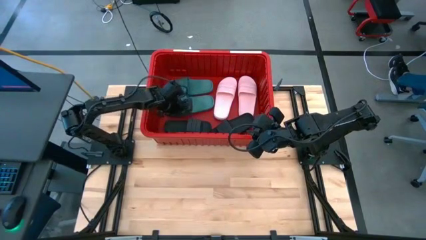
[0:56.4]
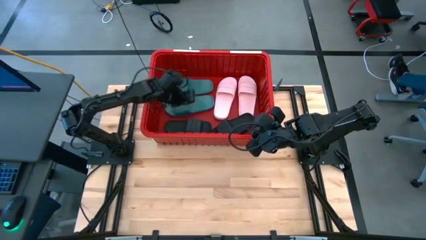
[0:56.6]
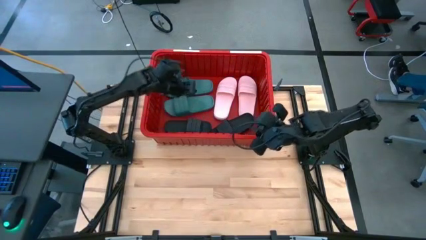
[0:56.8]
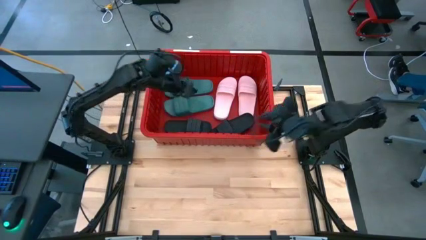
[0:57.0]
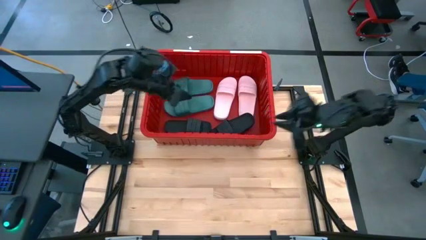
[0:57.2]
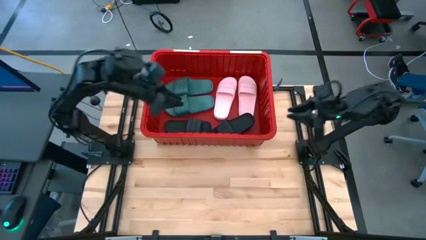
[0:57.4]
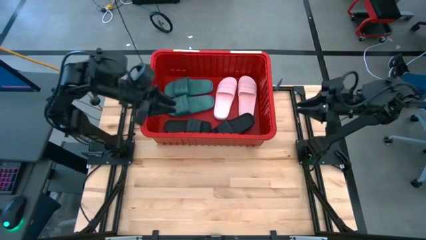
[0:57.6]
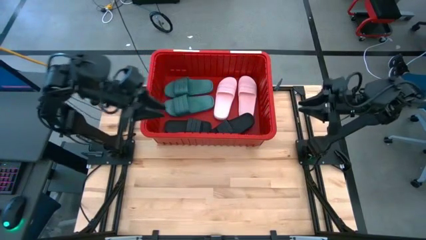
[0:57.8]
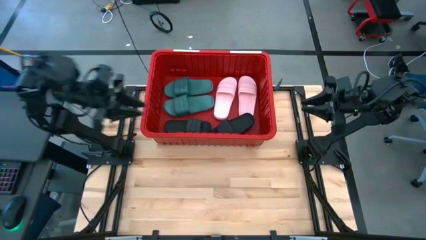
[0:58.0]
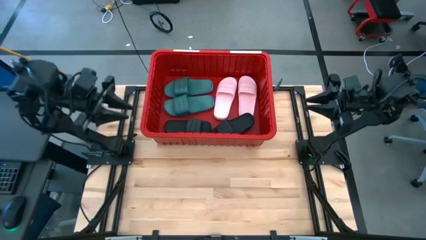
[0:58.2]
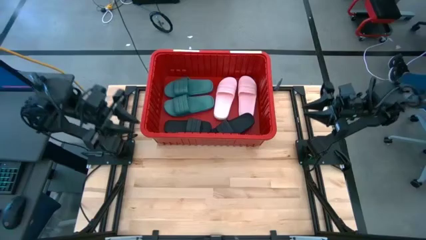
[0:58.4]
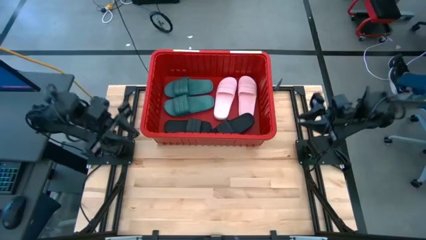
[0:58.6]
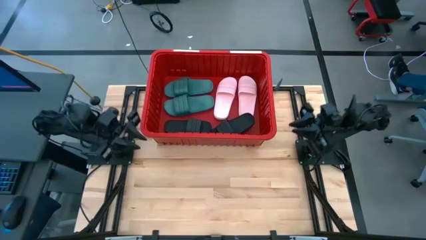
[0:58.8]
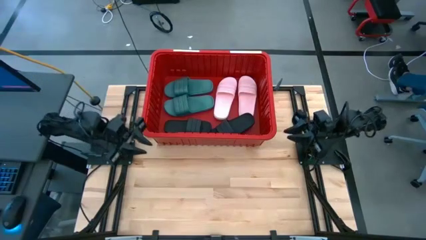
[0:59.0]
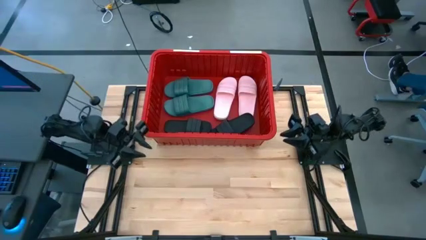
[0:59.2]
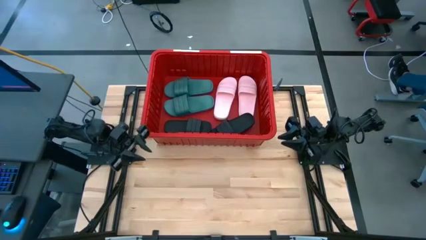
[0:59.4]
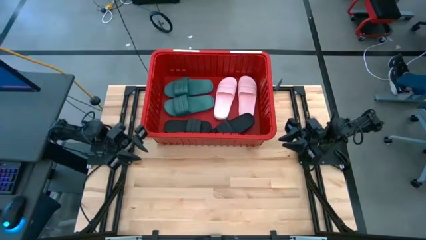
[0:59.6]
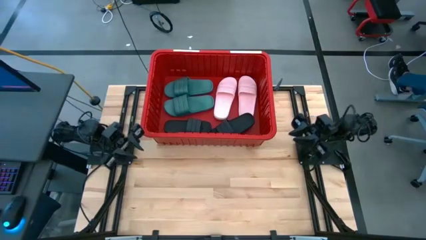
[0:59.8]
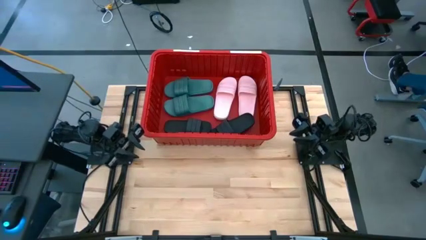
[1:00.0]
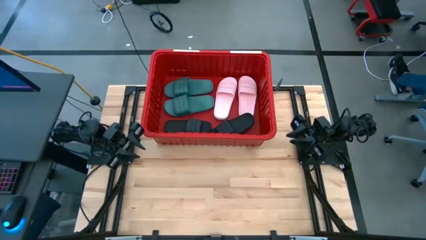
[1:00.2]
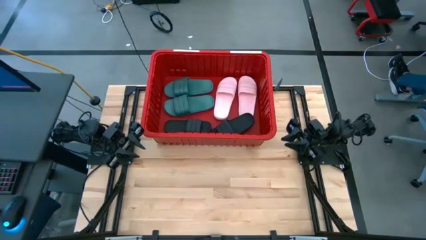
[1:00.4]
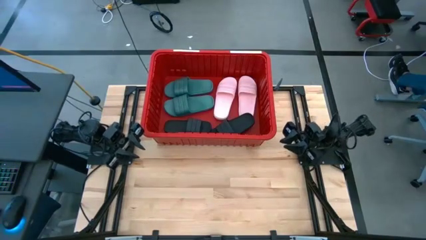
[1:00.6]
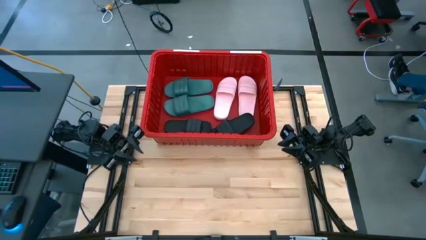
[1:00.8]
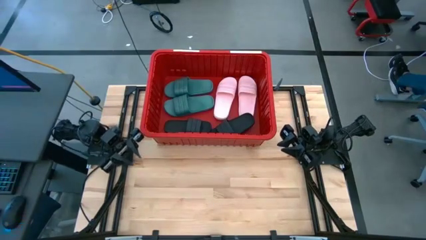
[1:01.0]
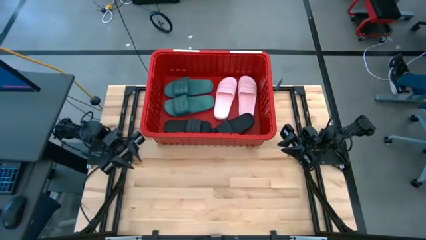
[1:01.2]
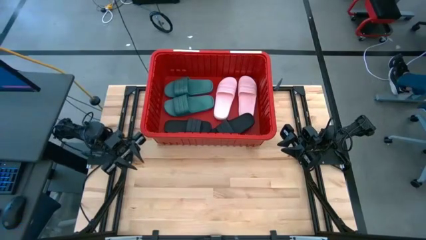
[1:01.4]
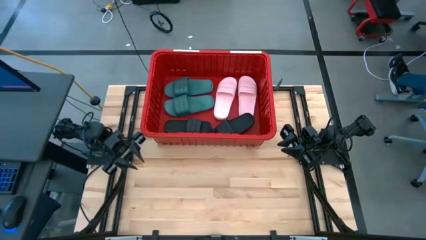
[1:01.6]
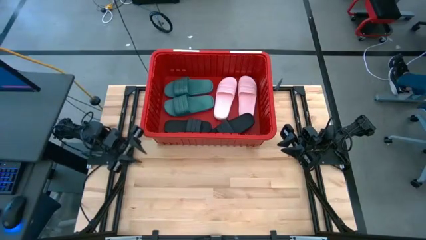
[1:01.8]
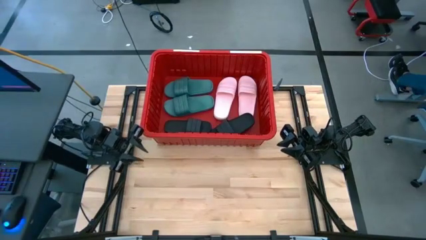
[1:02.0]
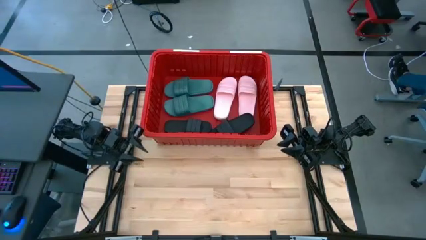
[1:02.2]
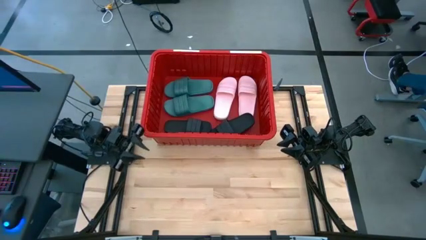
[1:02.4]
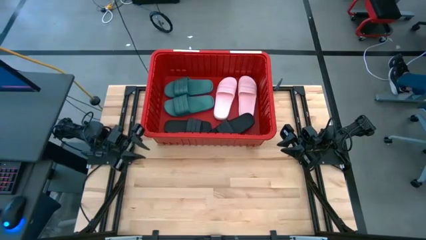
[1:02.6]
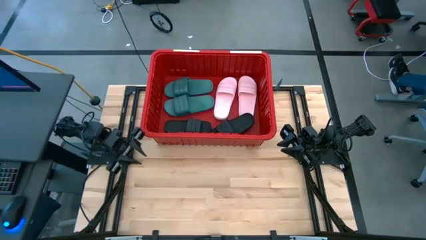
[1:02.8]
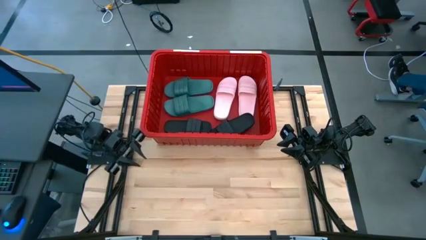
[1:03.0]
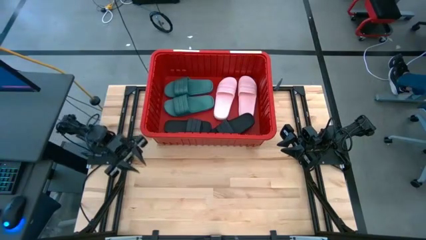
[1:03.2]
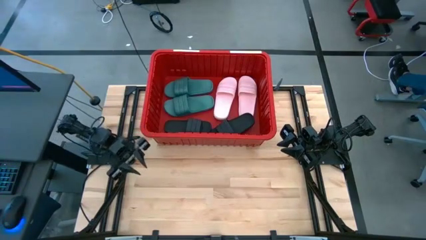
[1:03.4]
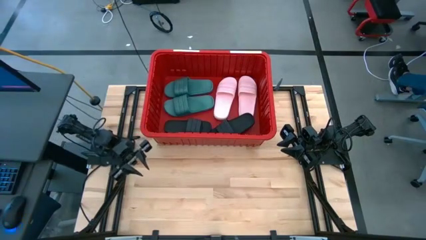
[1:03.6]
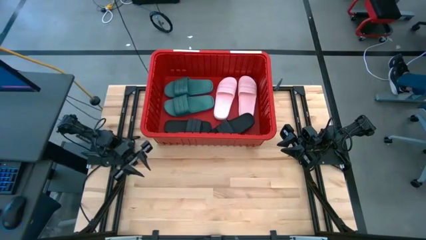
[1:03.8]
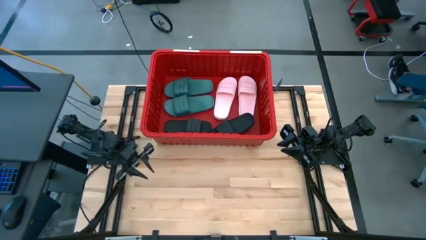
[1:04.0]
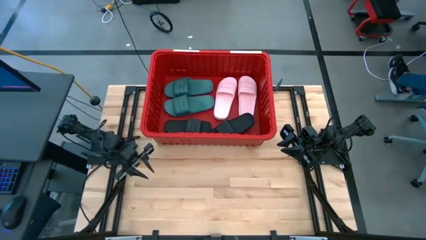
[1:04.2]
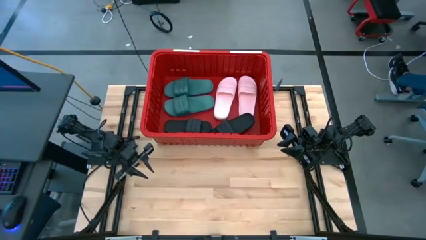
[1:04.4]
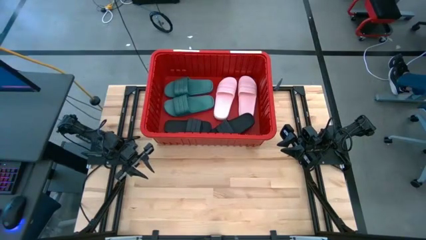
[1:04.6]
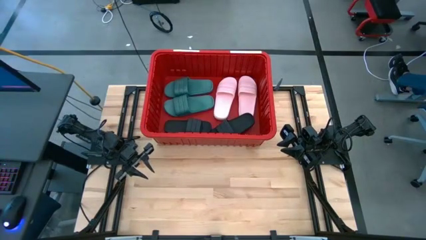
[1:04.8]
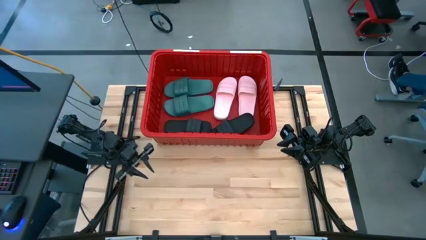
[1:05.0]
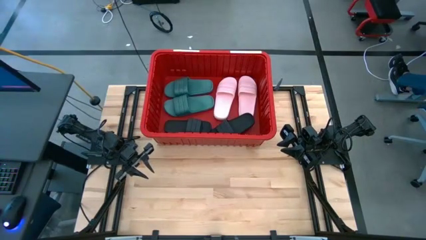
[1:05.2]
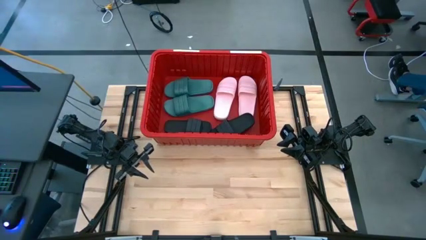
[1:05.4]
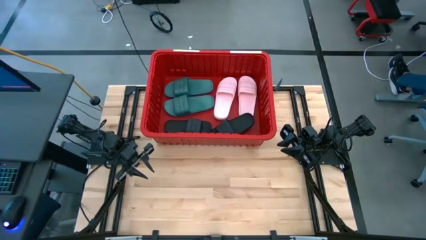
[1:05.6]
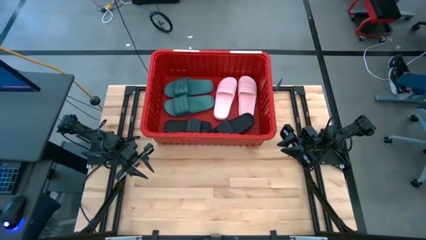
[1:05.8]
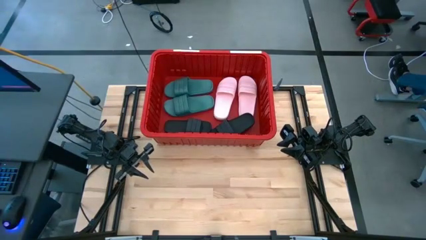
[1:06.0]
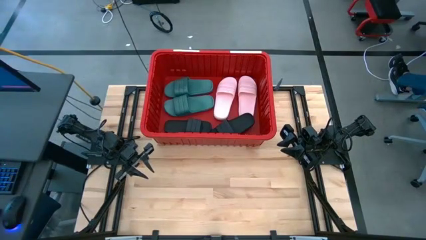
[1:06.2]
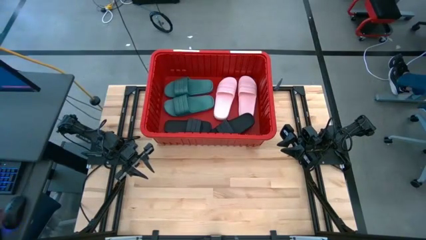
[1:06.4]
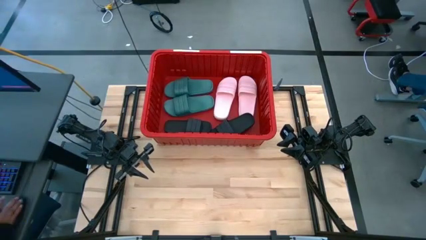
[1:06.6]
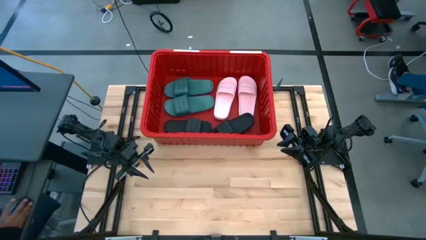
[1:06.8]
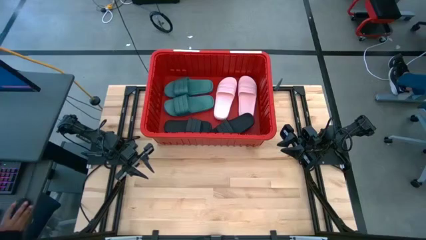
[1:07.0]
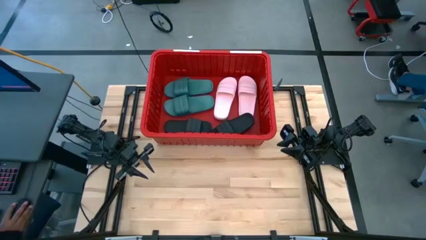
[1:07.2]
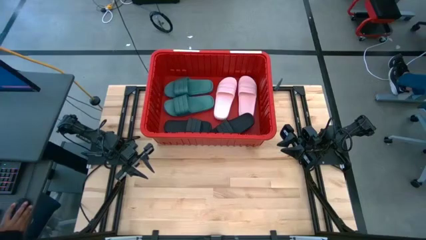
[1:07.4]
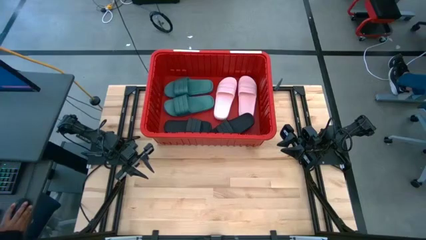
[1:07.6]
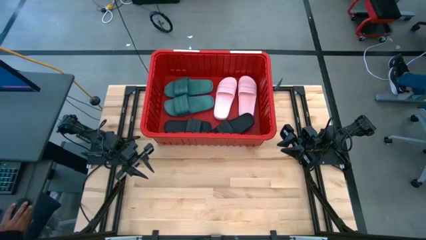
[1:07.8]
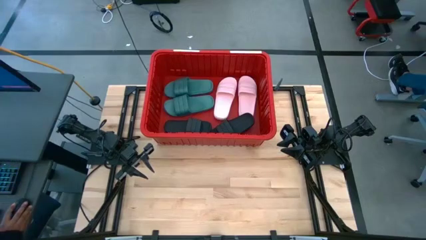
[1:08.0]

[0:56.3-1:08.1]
Task: Pick and place slides into bin
Return to Home Position

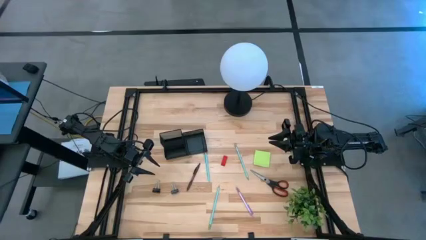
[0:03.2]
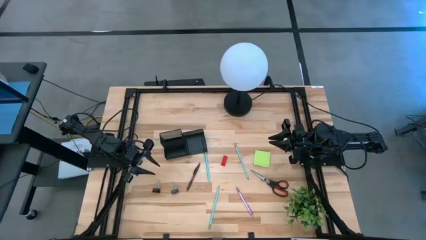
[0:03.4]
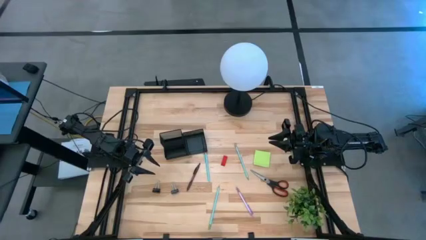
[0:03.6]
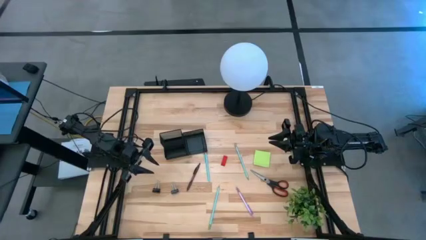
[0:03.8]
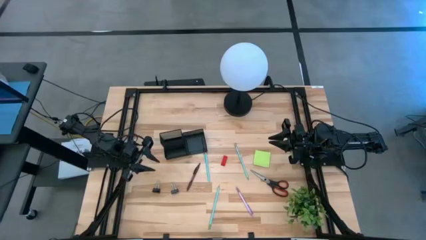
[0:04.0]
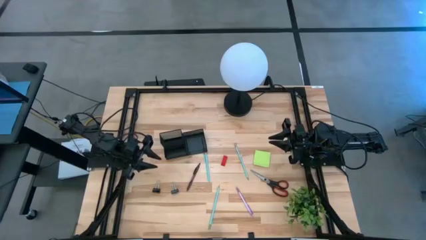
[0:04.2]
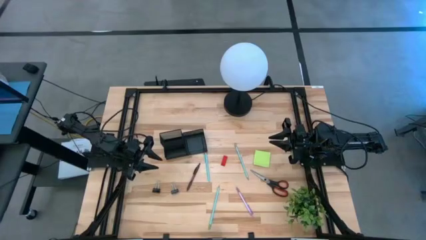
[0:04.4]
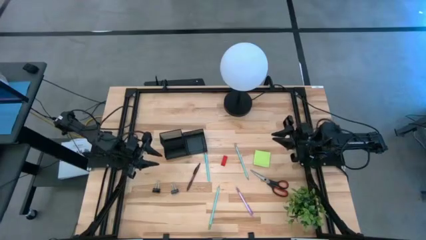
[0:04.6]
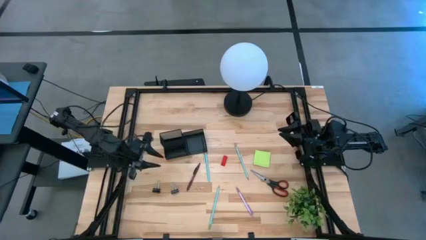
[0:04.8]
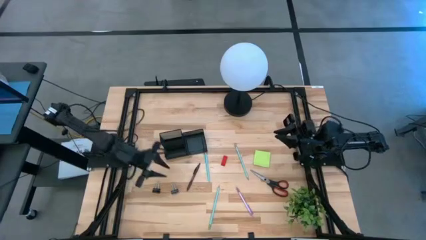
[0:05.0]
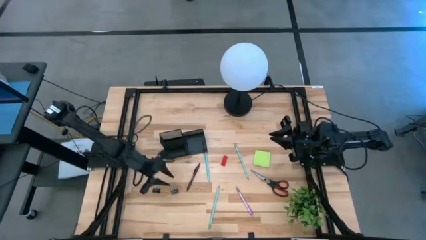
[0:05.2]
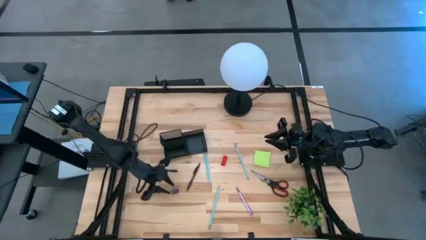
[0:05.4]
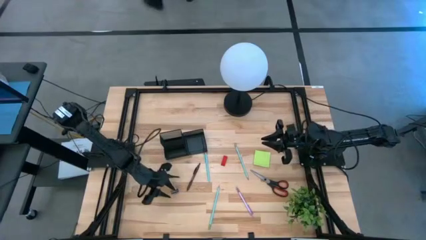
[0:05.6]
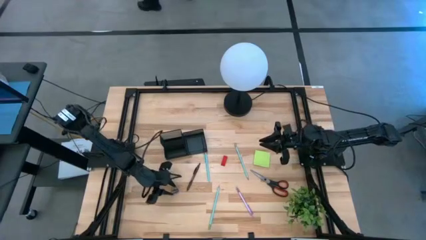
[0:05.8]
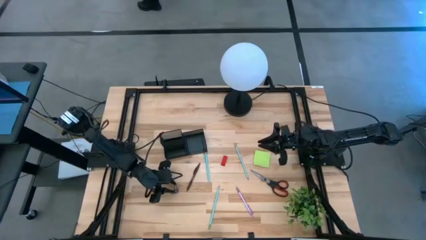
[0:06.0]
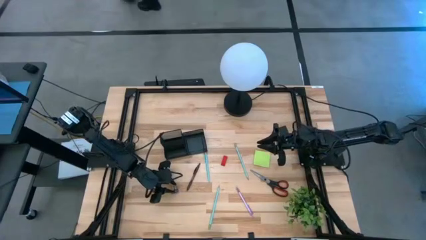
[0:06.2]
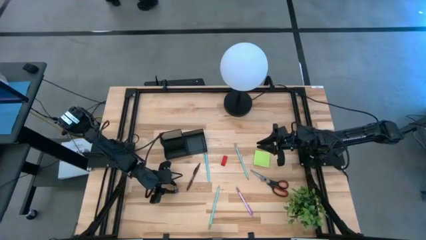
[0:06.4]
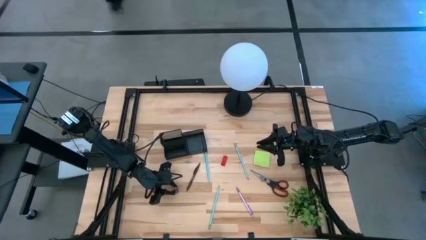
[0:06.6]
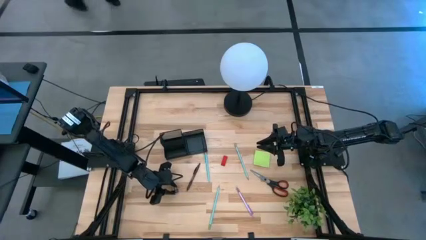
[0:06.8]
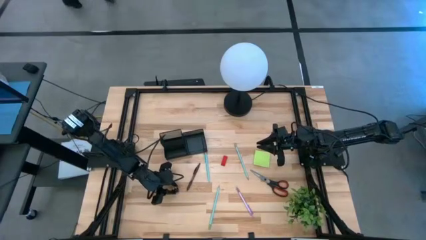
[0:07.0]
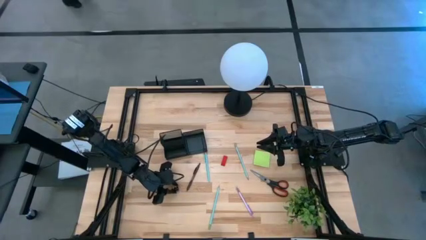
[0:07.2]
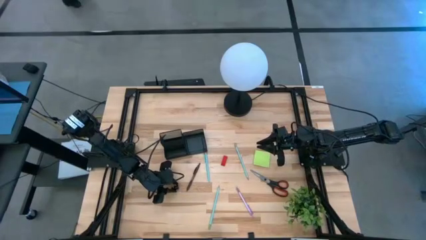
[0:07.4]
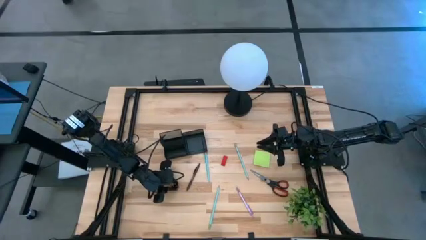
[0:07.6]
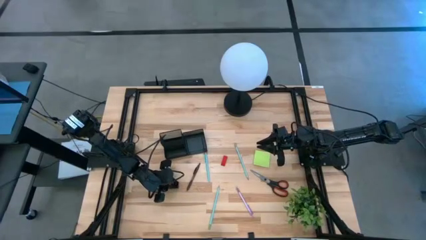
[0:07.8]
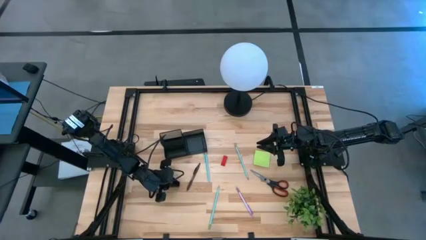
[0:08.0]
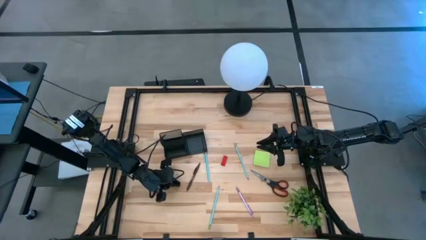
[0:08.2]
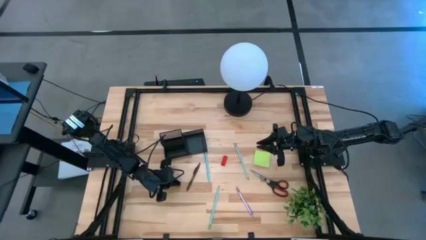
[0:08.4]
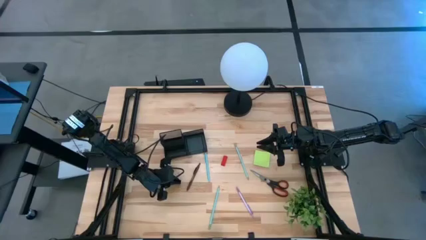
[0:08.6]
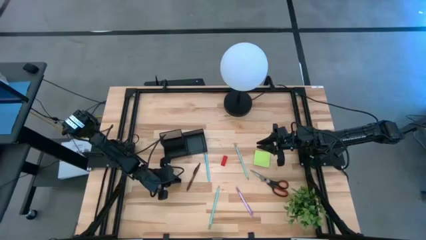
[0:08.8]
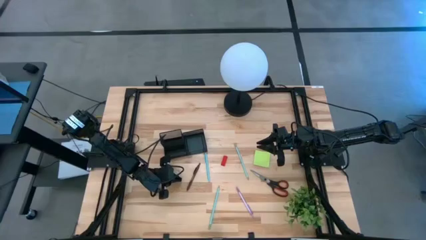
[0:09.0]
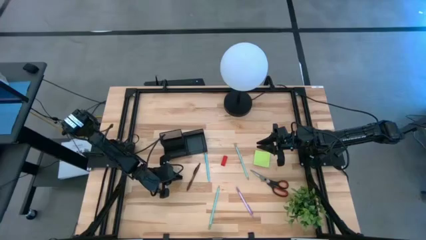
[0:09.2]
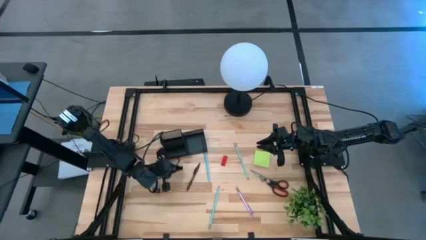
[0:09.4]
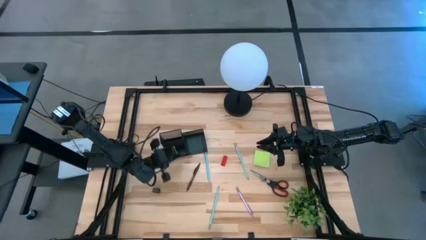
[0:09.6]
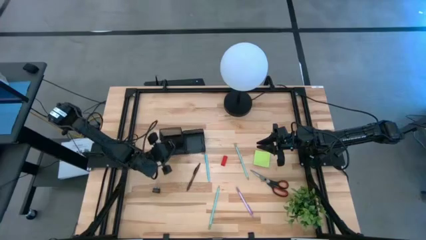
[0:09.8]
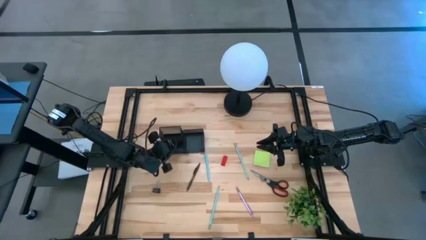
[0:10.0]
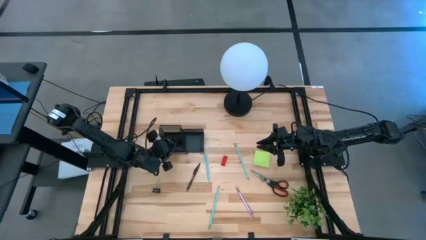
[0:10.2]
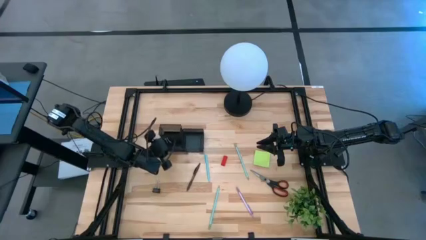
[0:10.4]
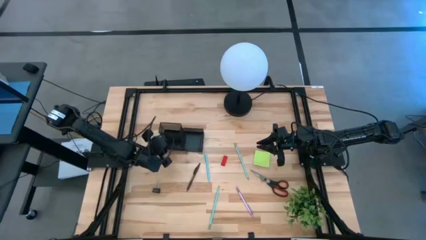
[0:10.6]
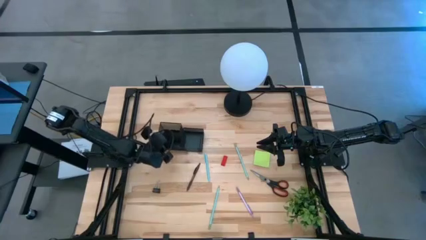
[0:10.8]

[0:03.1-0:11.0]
Task: Pick and place office supplies into organizer
Put the right black binder clip into the black desk organizer
